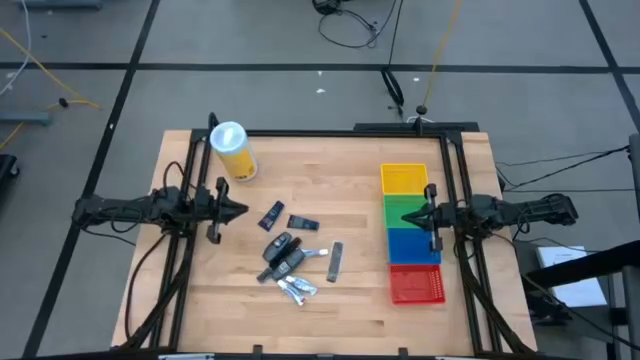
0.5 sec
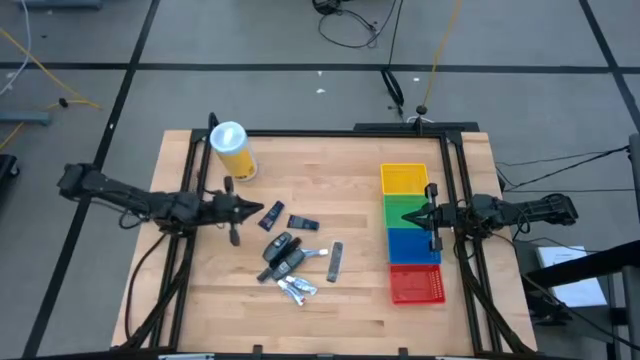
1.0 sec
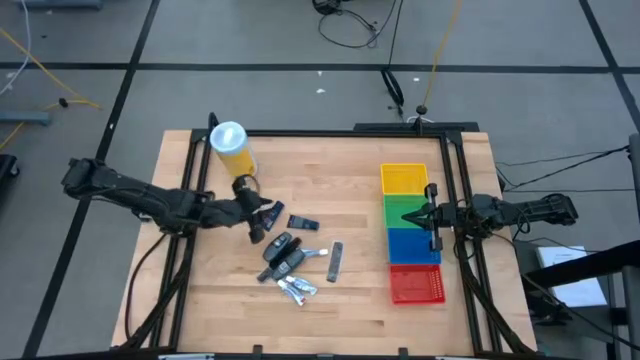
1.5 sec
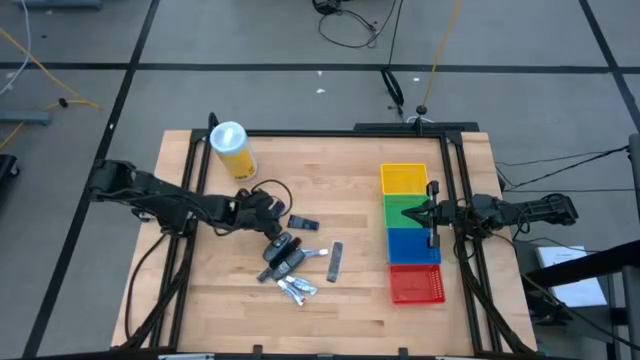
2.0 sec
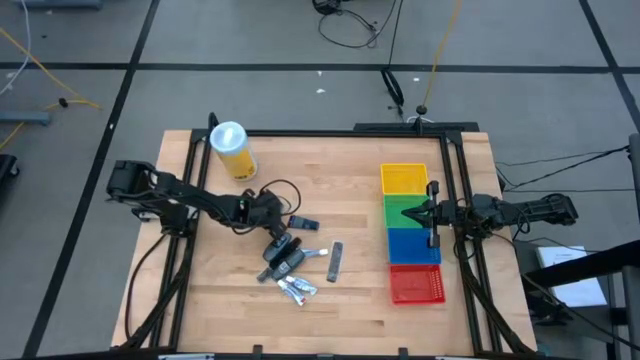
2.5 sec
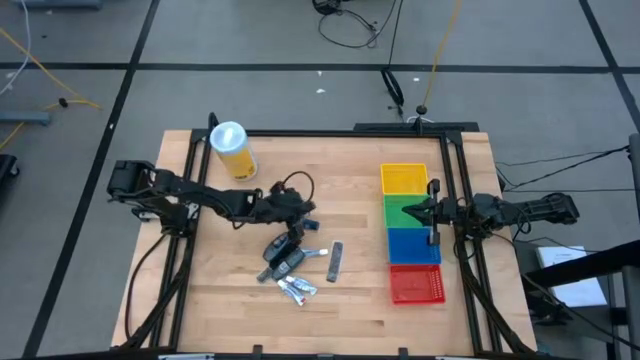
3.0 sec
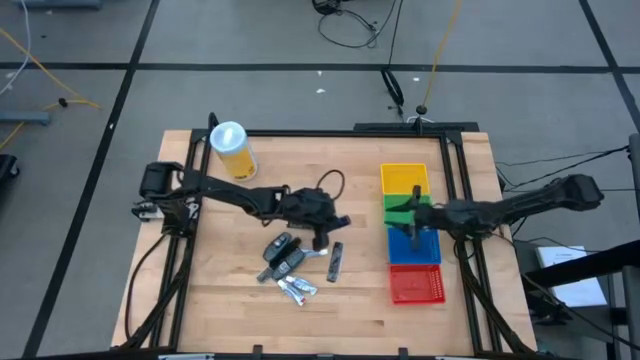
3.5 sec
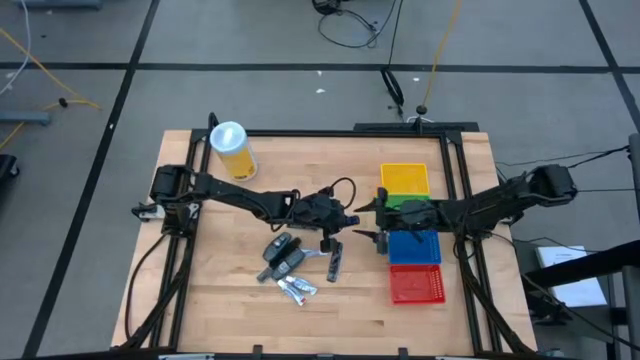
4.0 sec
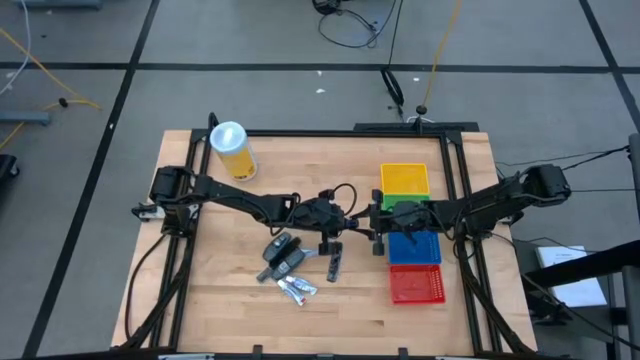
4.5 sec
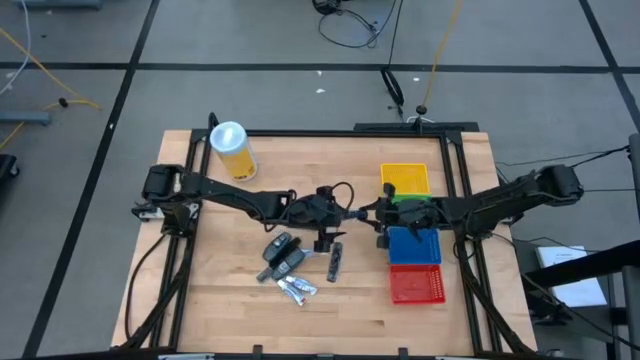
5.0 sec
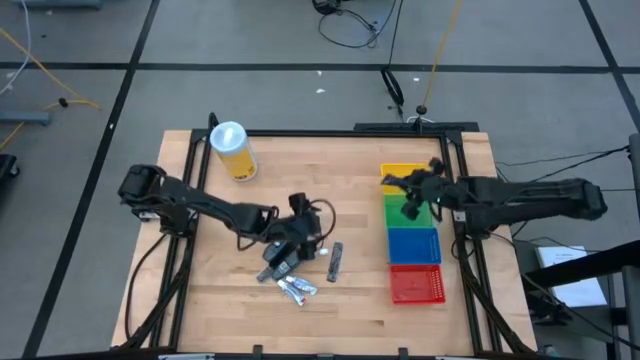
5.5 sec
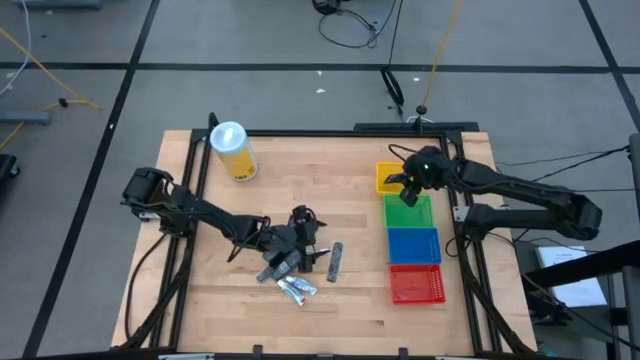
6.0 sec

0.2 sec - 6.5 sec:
Task: Pick & Place Travel size toiletries
Put the blue shave cream into the yellow bin

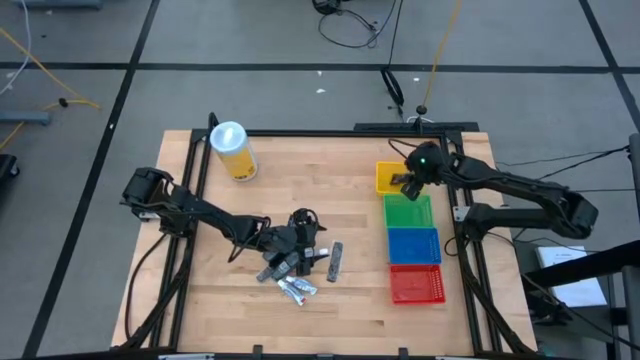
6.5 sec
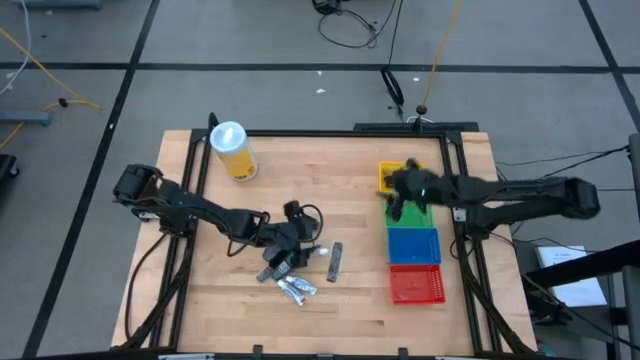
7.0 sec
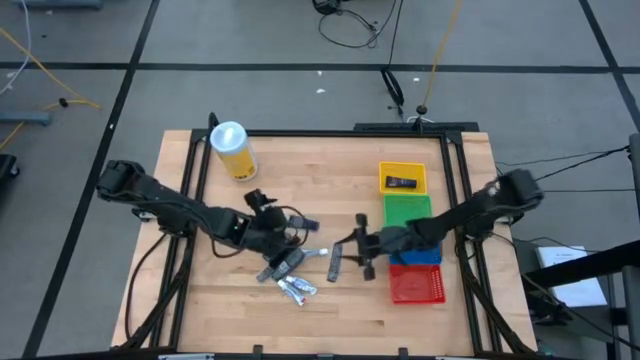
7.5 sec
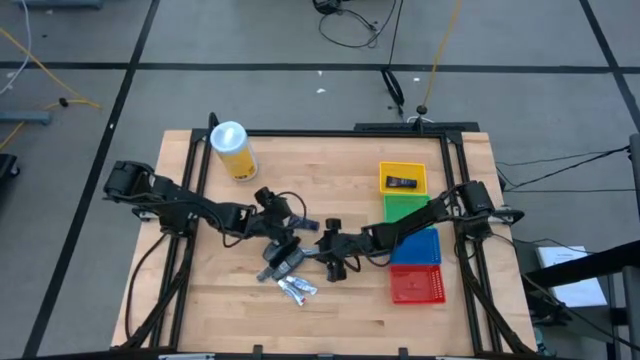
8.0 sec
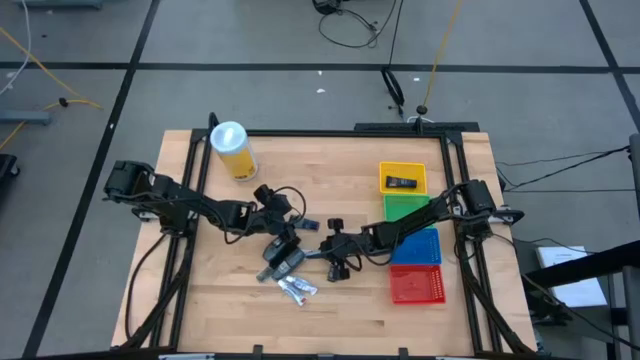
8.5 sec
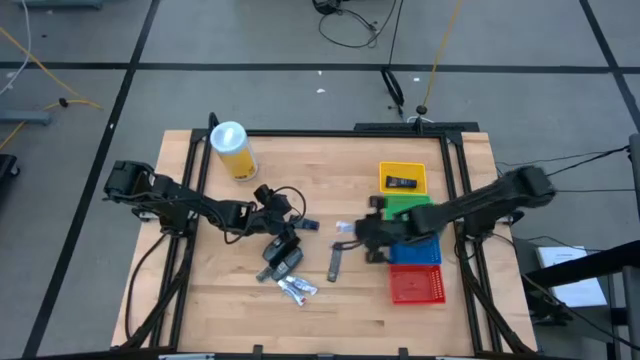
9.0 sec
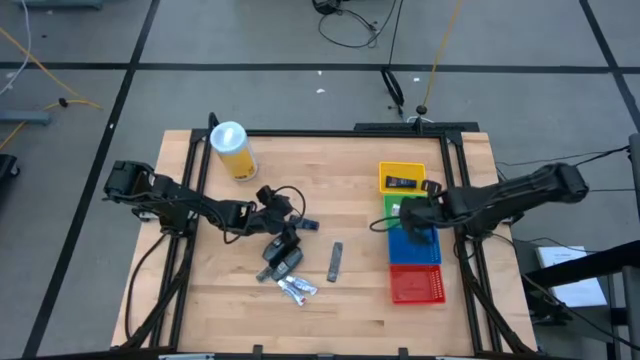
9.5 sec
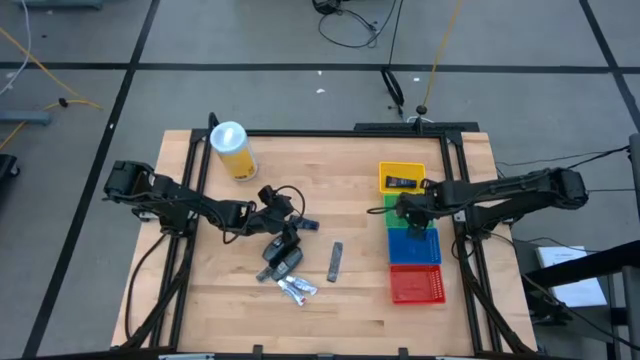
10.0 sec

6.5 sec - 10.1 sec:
Put the white toothpaste into the green bin

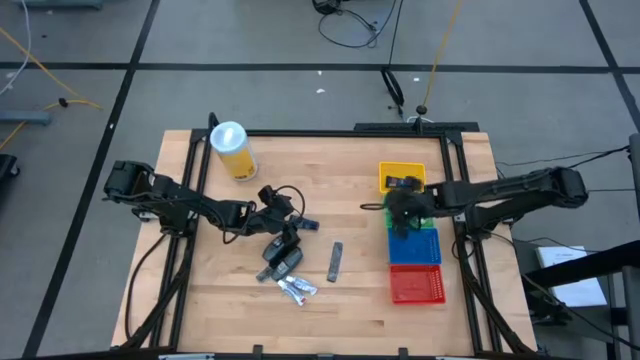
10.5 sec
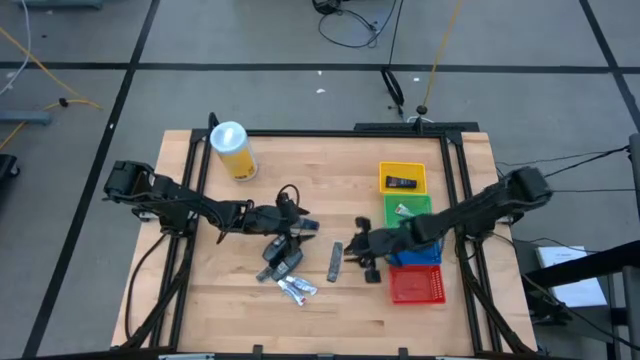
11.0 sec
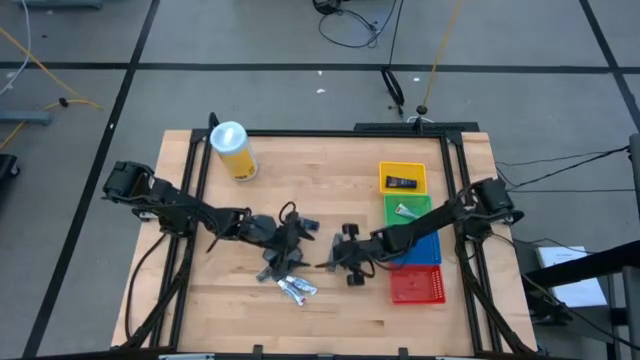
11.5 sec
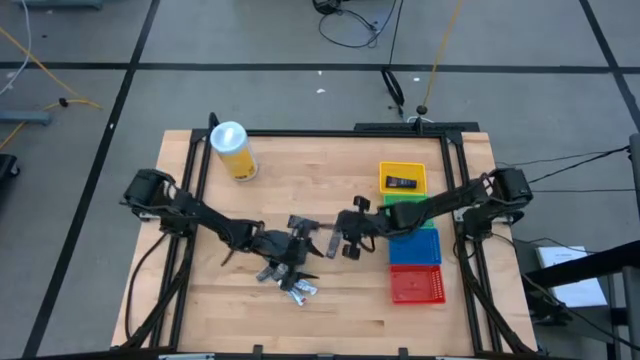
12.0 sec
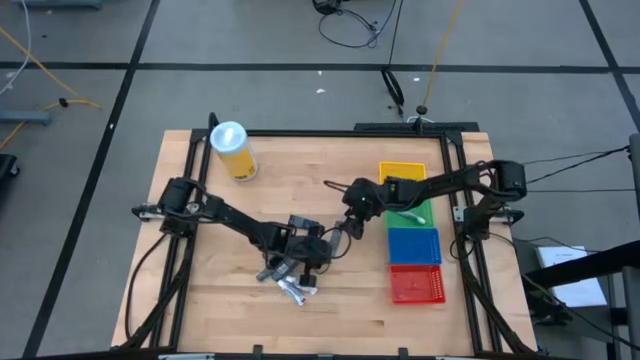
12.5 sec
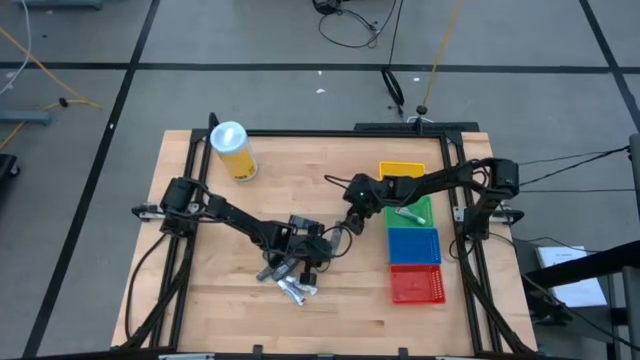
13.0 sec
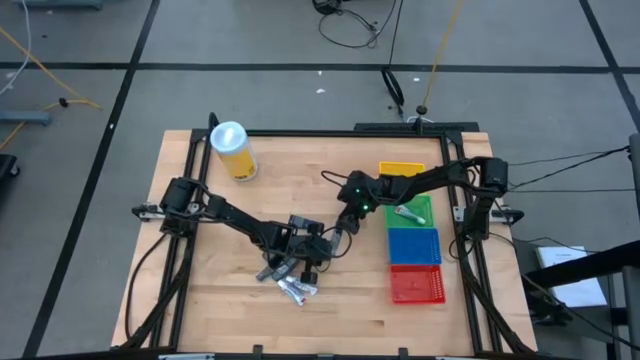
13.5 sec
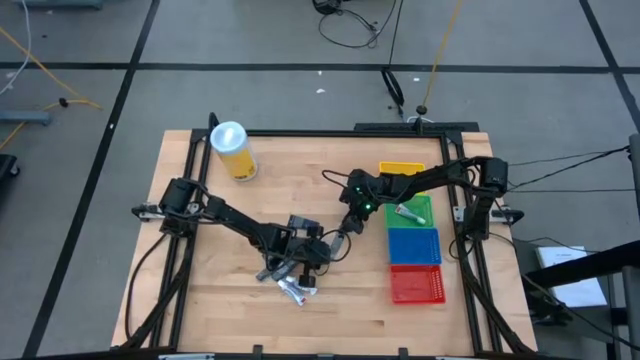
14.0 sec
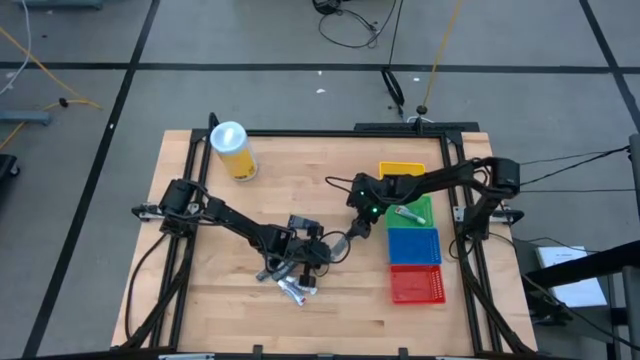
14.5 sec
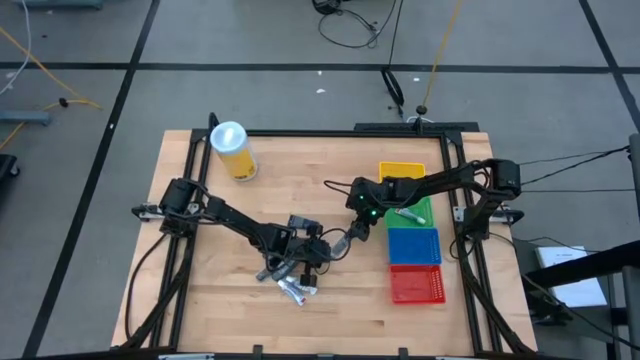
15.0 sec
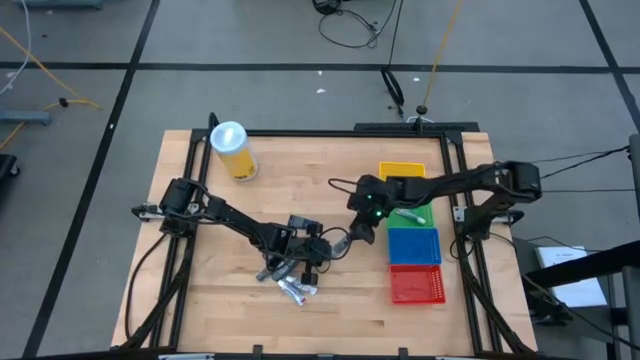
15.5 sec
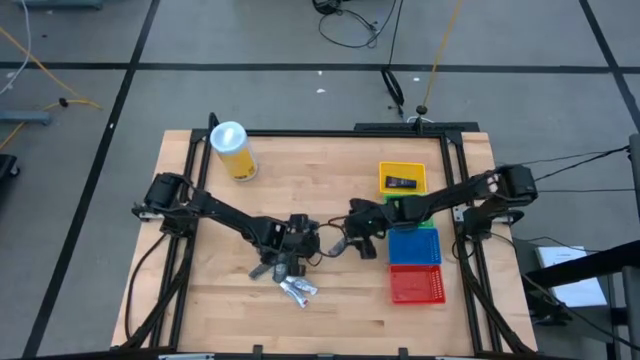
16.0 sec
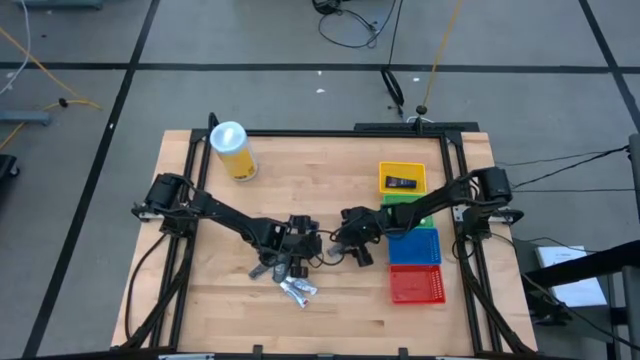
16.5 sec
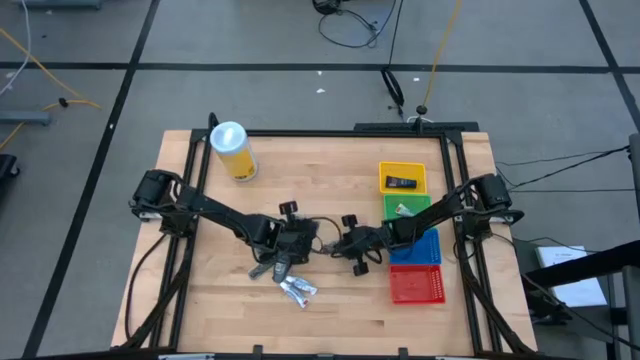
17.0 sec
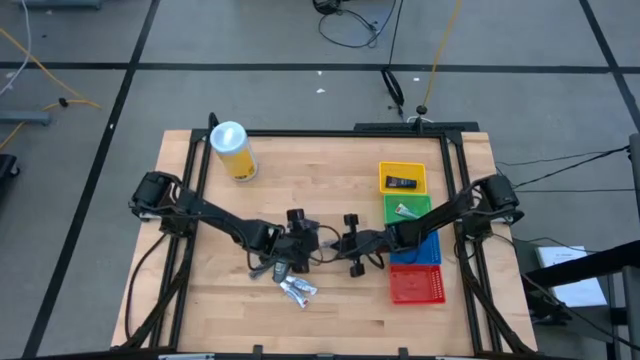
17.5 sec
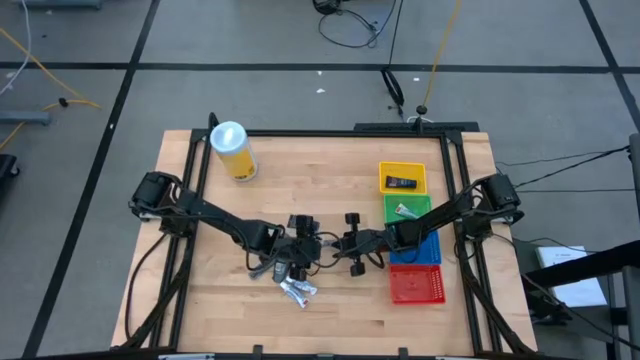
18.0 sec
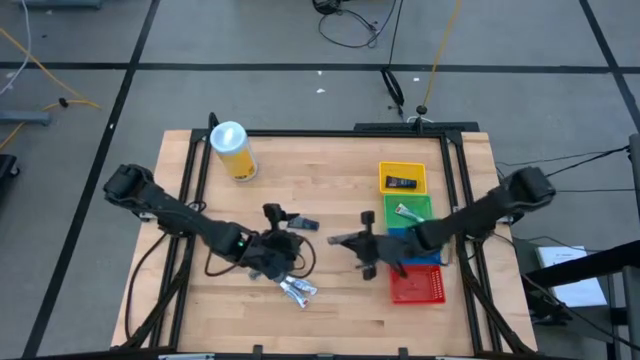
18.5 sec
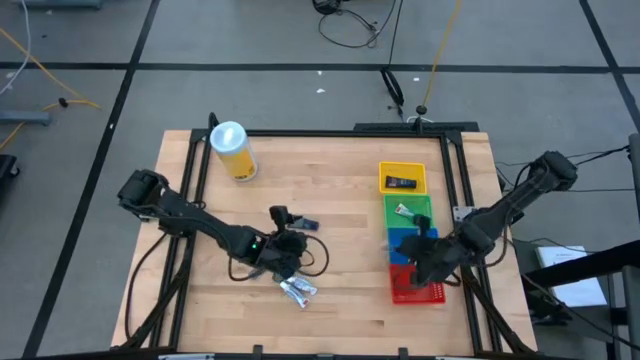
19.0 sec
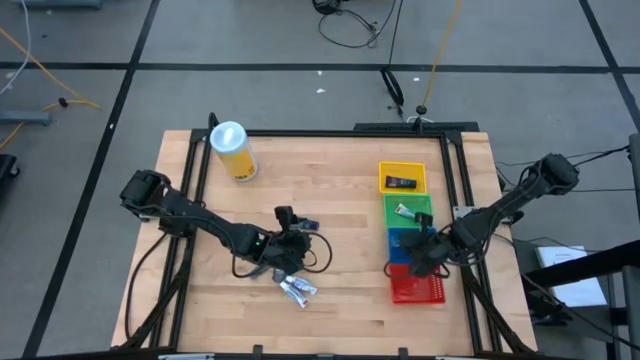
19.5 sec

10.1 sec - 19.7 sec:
Put the black hair comb into the blue bin

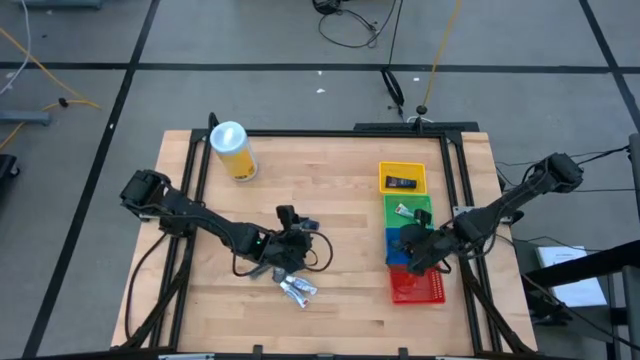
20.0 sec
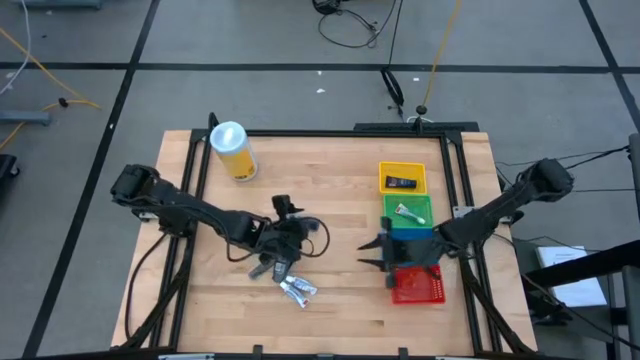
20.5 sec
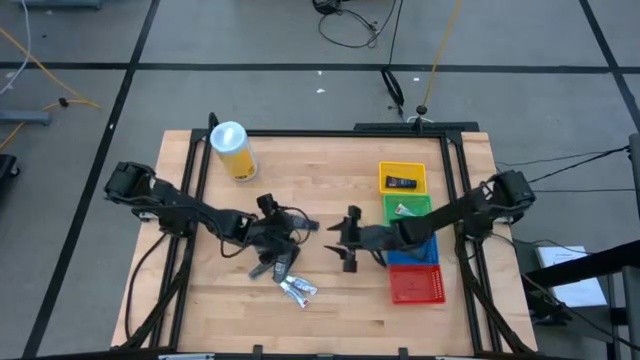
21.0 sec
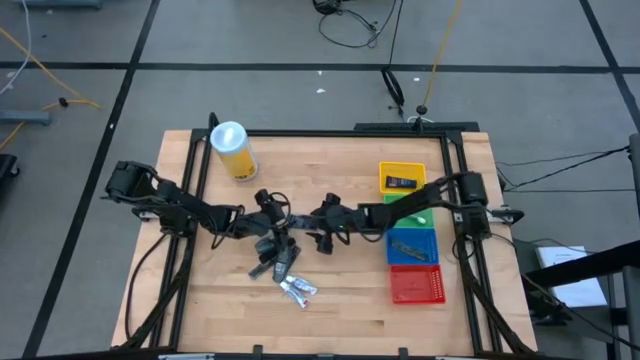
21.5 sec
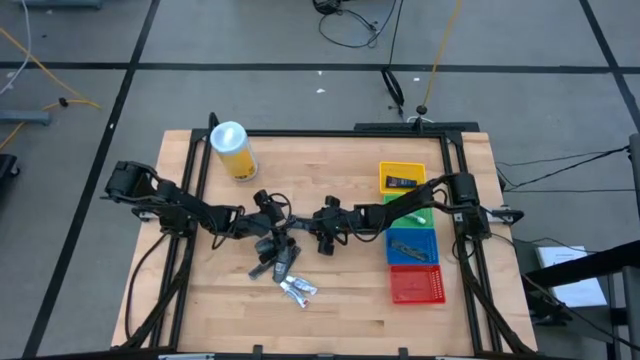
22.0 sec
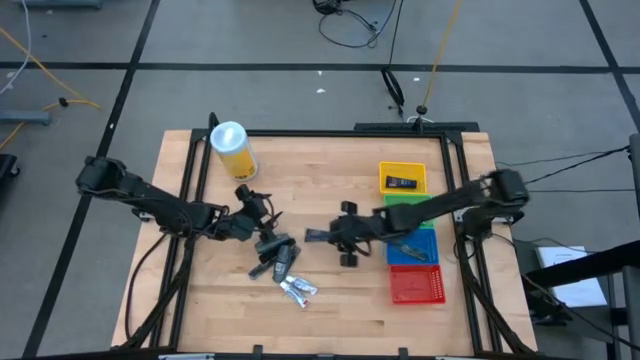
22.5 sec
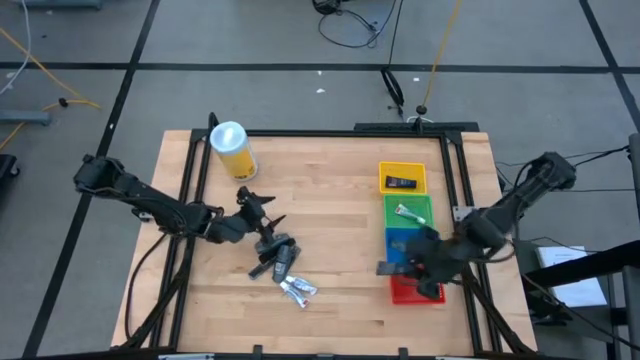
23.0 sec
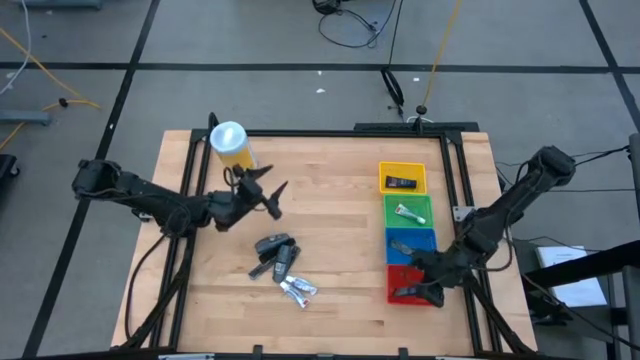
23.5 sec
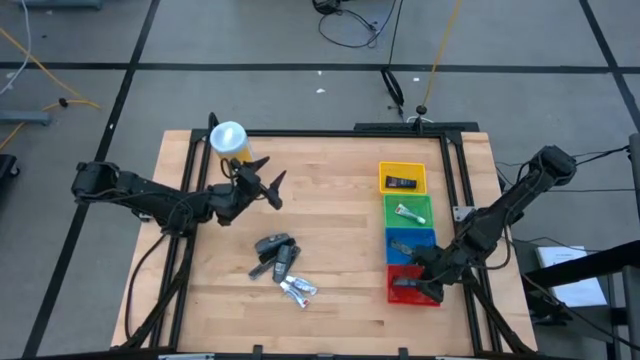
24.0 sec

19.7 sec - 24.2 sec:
Put the blue shave cream into the red bin
